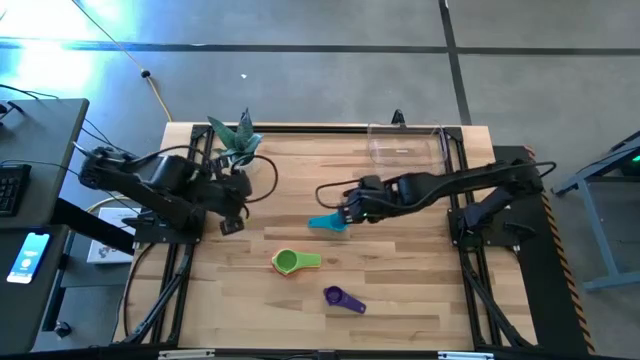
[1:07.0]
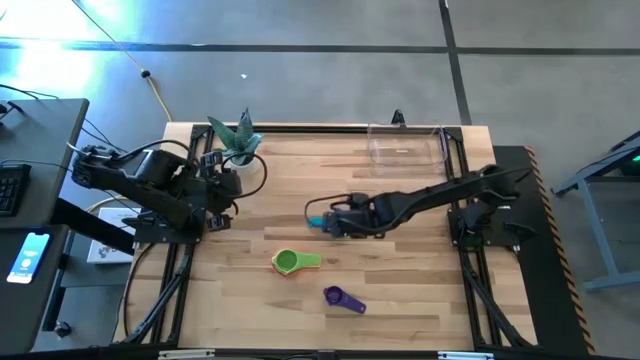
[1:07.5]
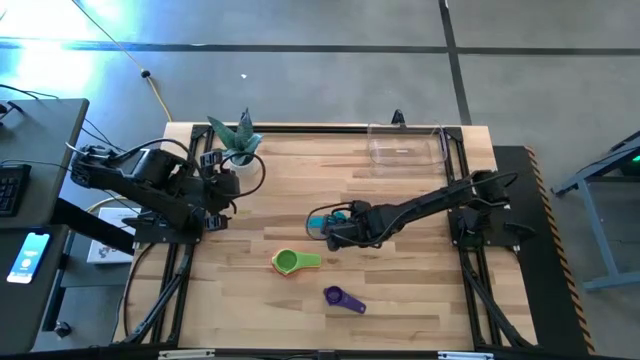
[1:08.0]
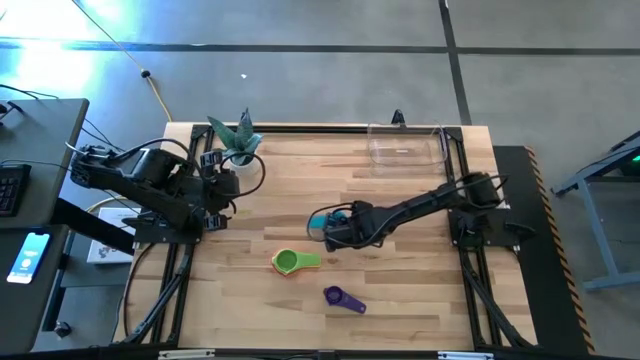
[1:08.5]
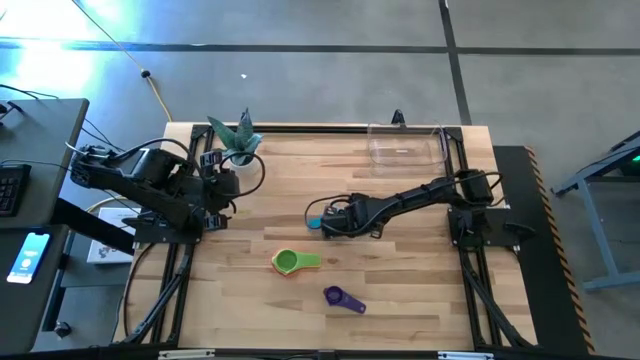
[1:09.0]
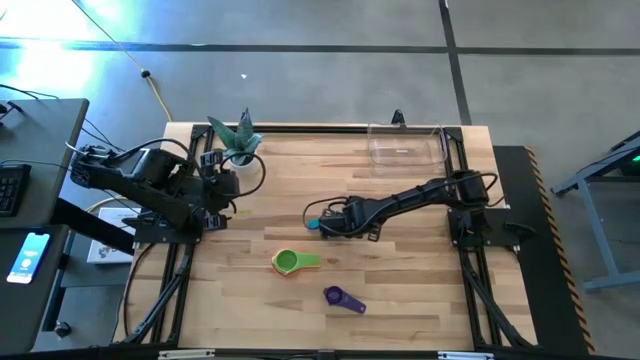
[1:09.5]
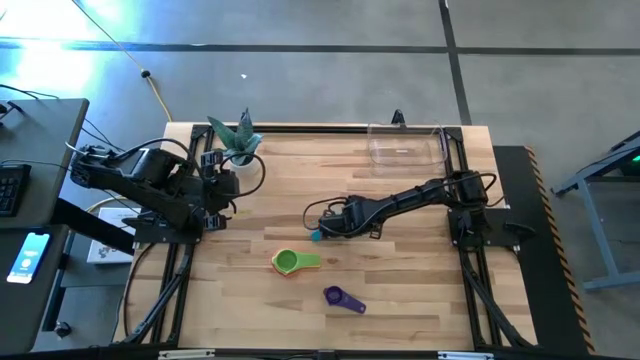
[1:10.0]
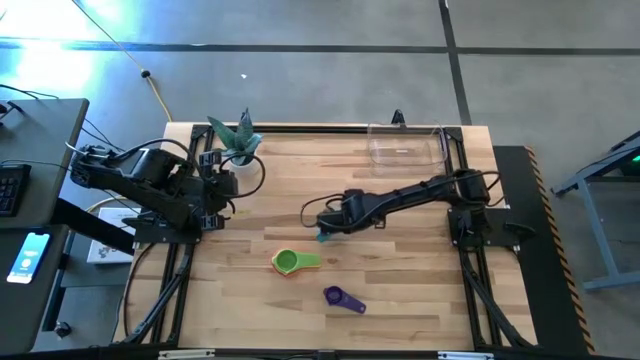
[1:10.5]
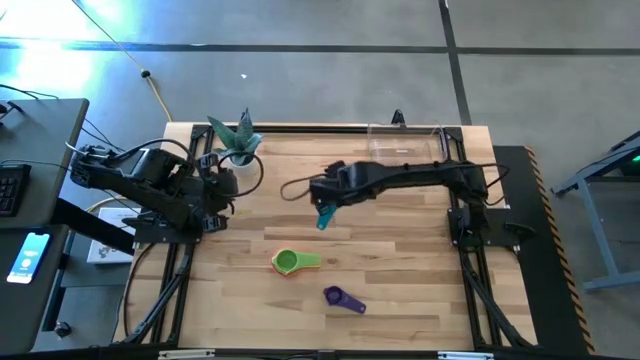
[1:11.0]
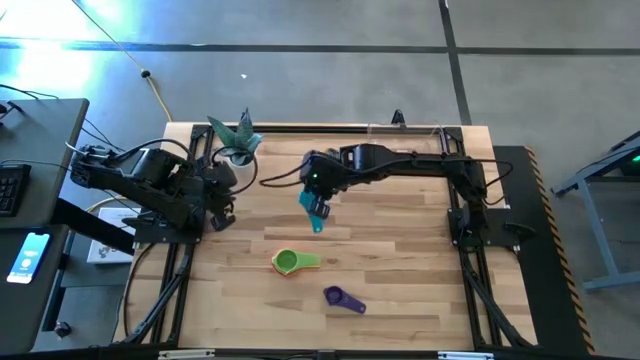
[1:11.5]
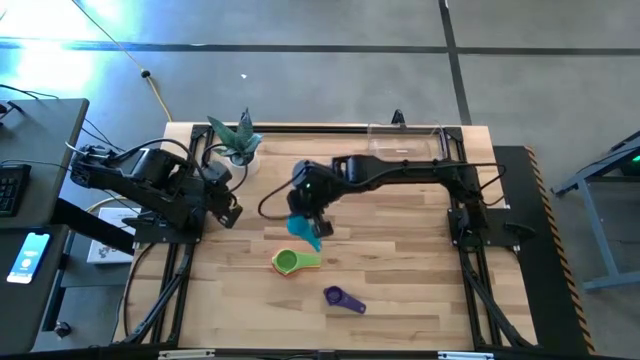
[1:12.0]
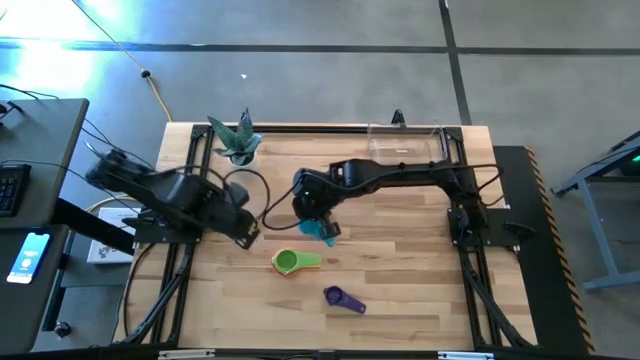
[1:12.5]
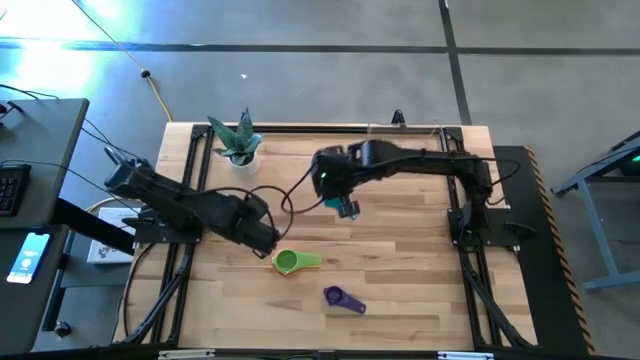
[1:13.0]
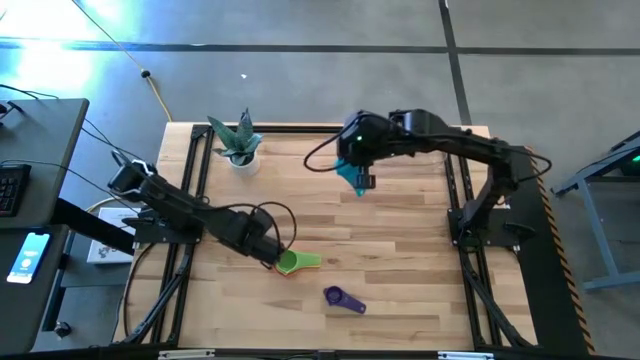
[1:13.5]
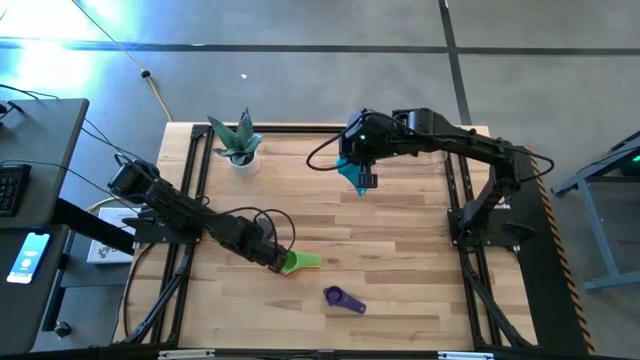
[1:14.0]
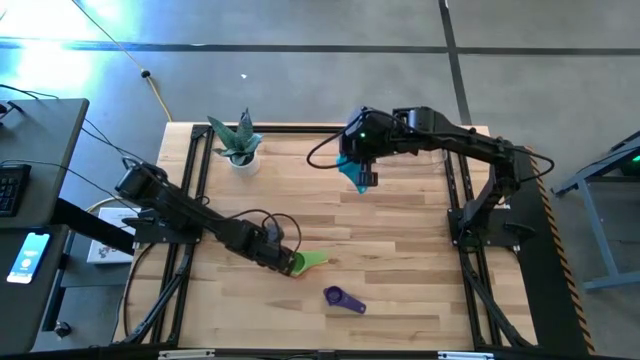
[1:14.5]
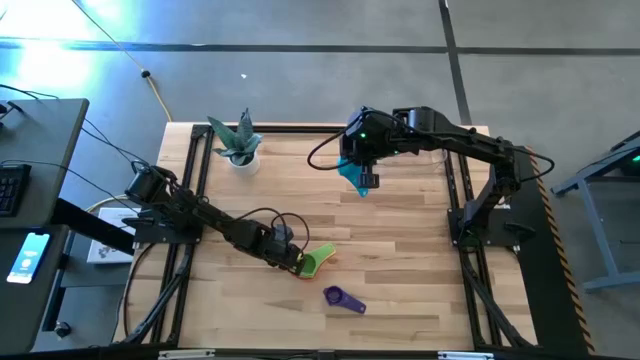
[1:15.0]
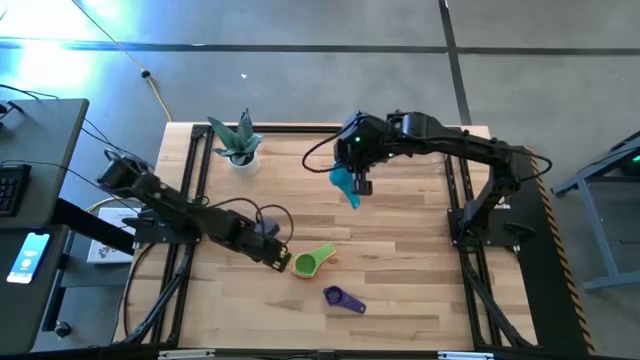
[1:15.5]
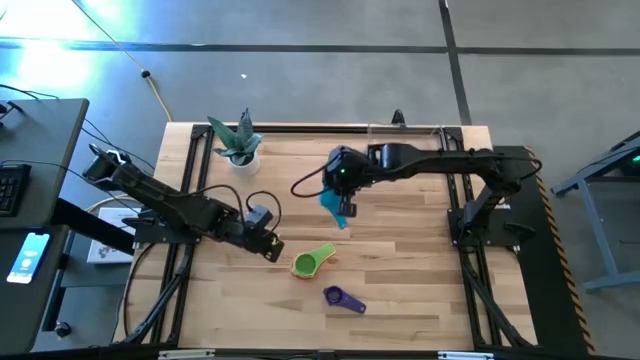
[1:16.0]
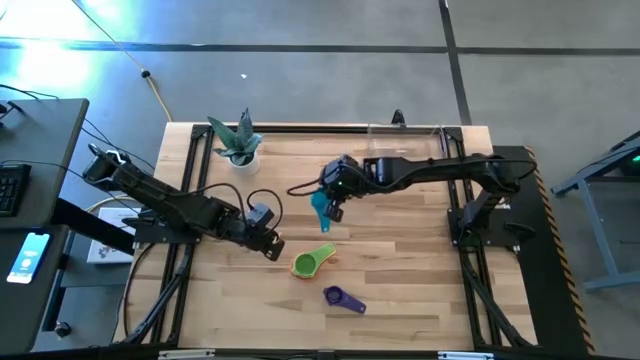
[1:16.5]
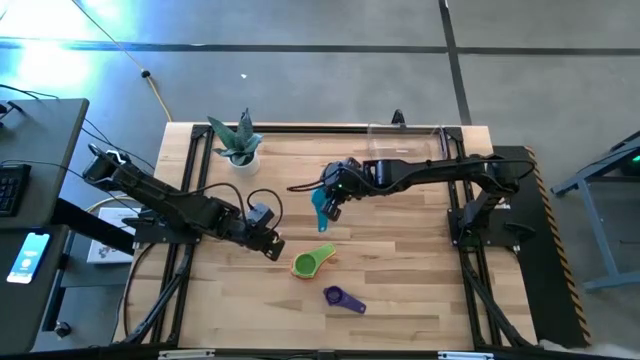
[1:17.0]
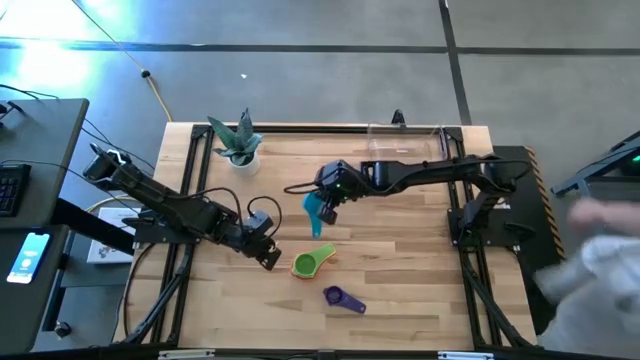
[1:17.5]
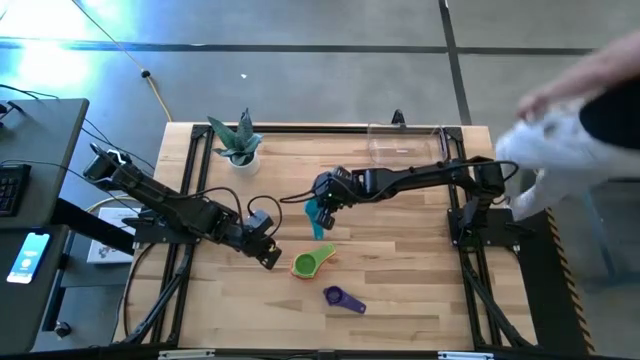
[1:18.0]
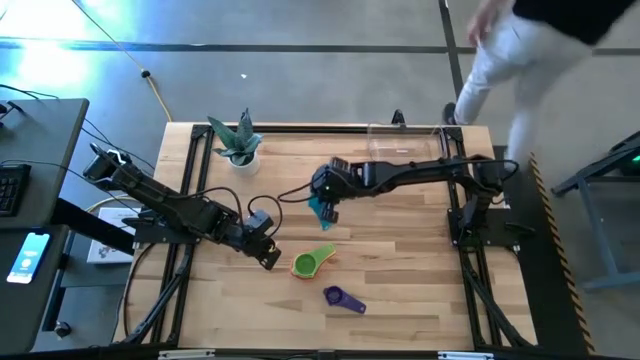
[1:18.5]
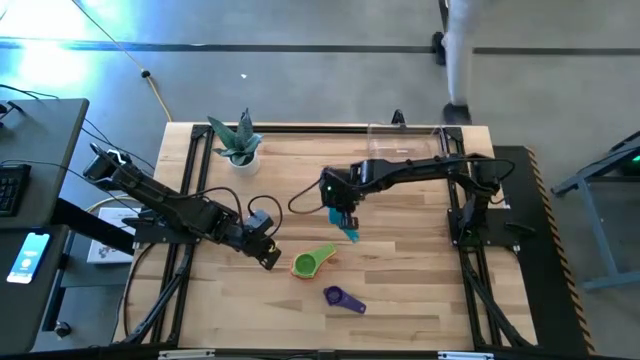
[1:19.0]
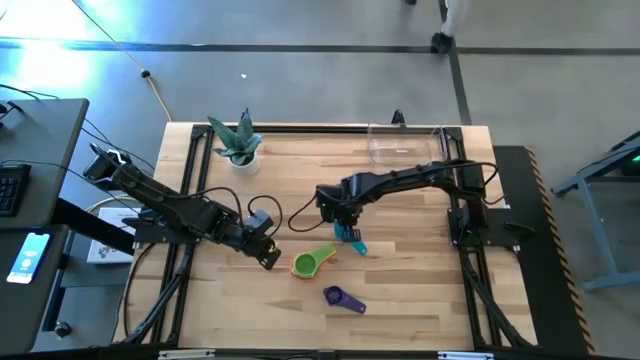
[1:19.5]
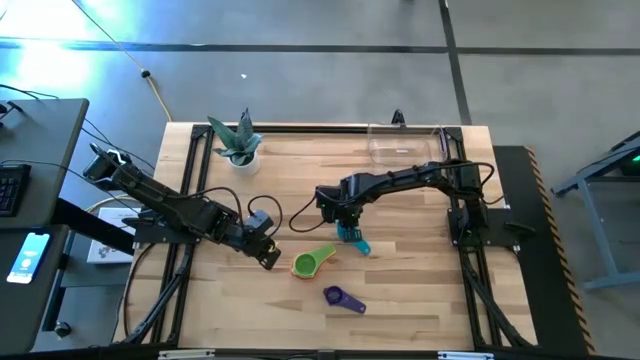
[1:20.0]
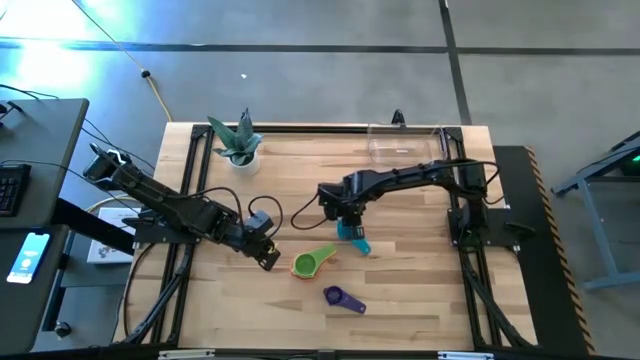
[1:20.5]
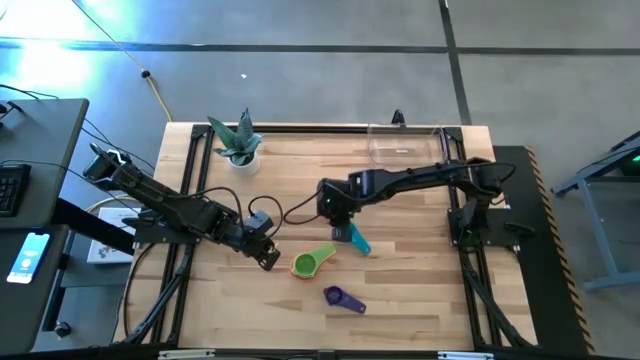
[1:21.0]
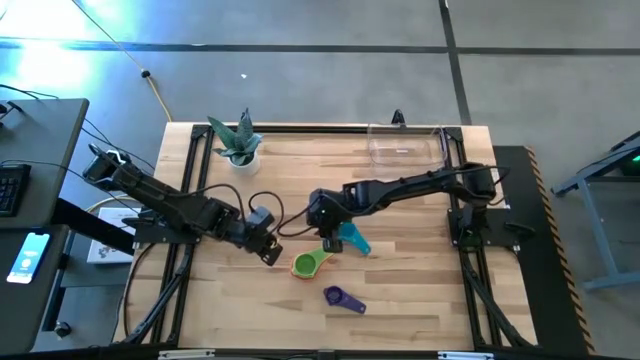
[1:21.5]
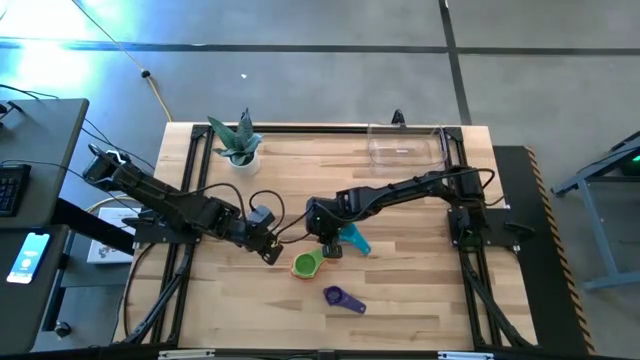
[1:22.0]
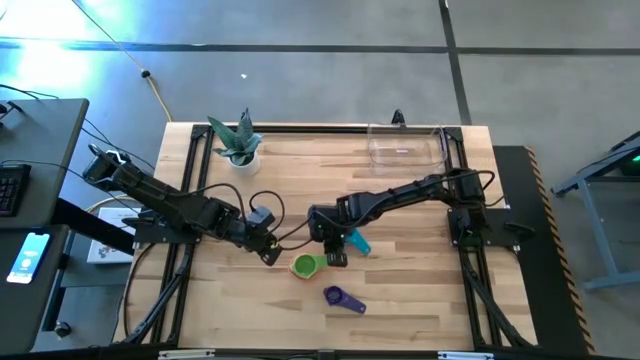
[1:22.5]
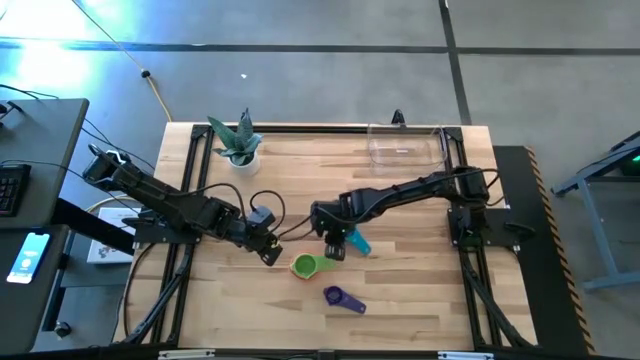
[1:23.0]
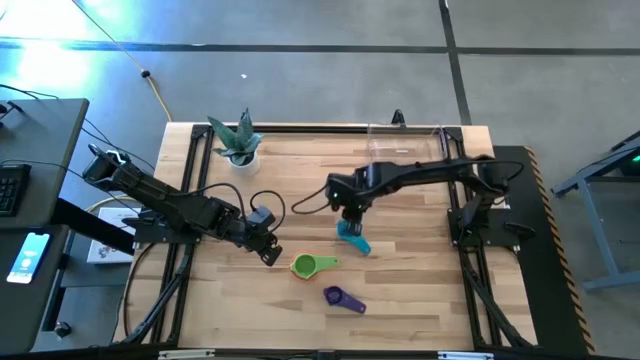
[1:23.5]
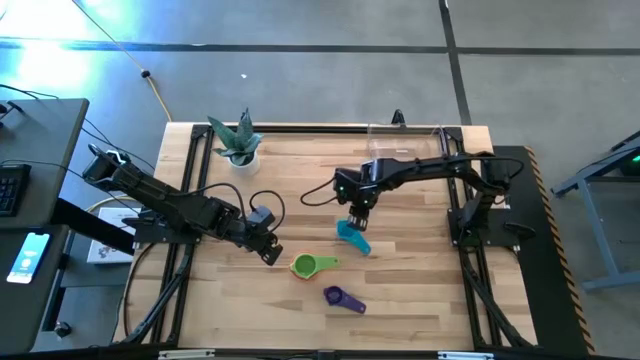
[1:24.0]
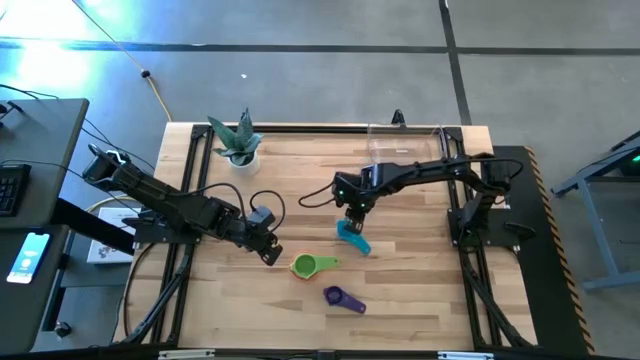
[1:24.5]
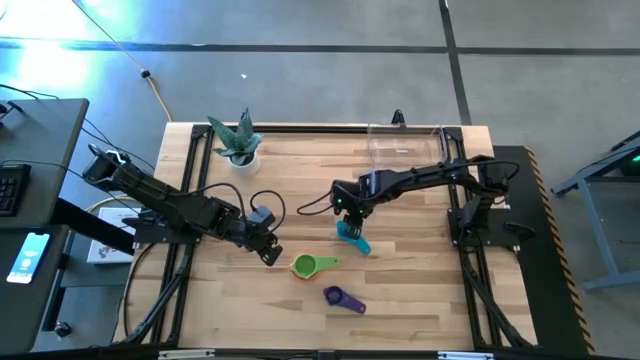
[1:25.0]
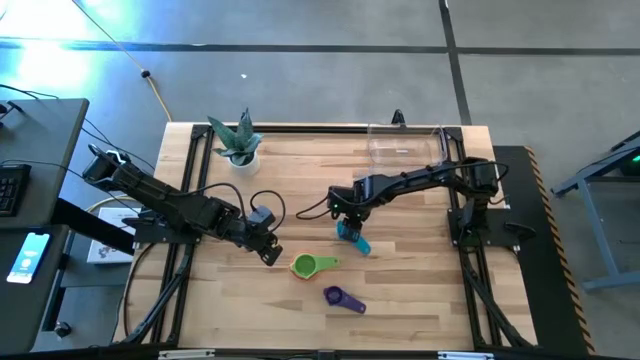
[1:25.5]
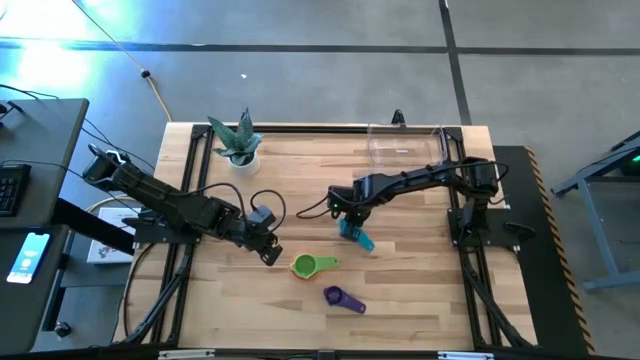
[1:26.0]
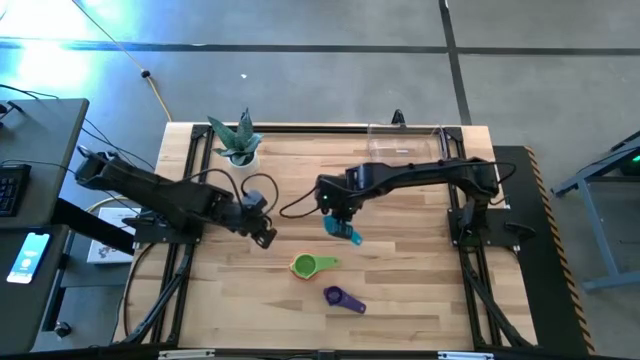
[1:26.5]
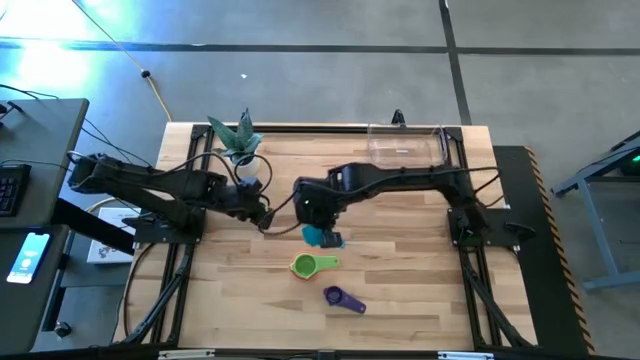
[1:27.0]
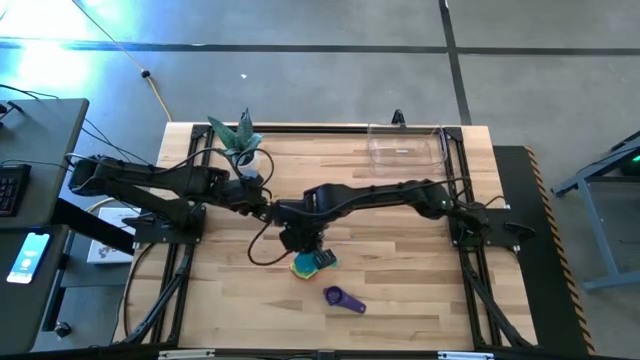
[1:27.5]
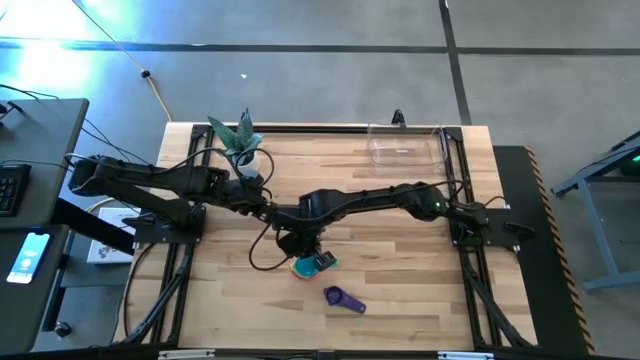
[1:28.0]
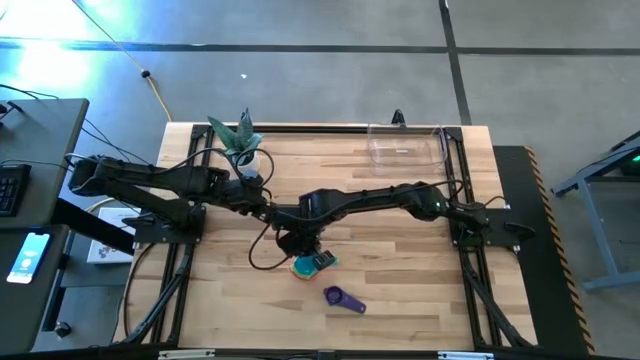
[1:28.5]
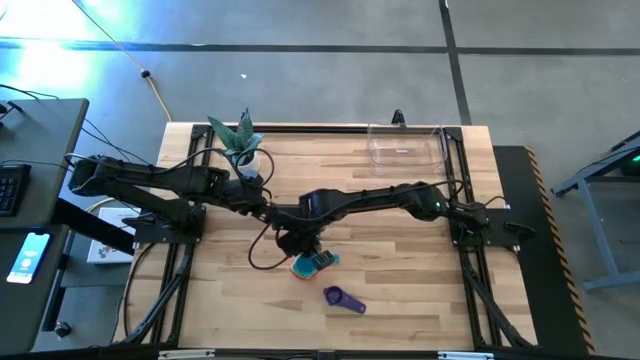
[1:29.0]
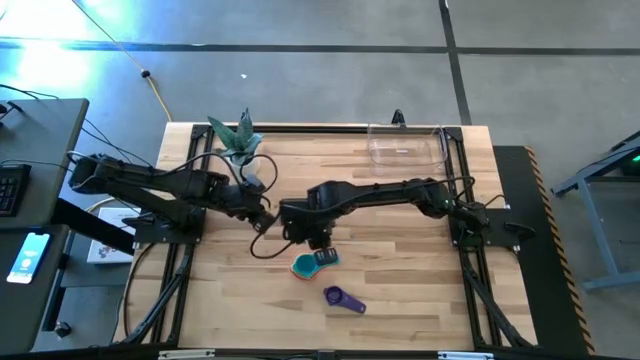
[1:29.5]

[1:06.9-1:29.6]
Task: Nest measuring cups in basket
Stack the blue measuring cup into the green measuring cup
